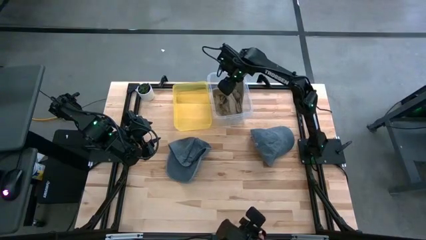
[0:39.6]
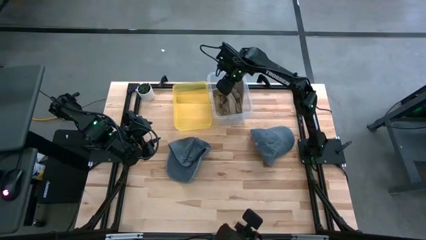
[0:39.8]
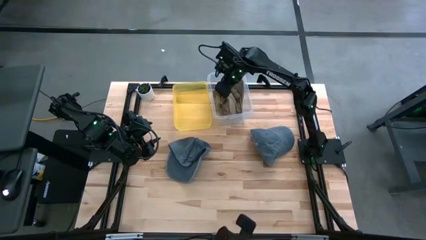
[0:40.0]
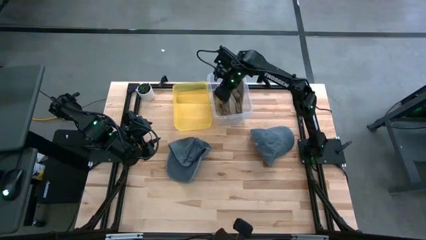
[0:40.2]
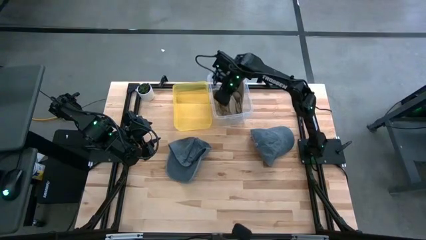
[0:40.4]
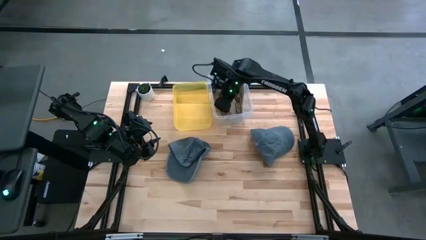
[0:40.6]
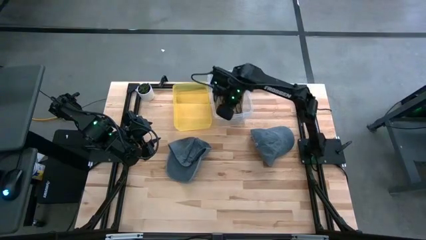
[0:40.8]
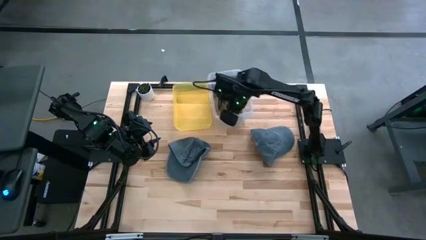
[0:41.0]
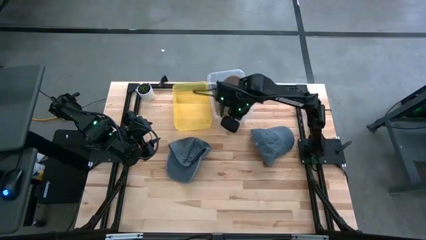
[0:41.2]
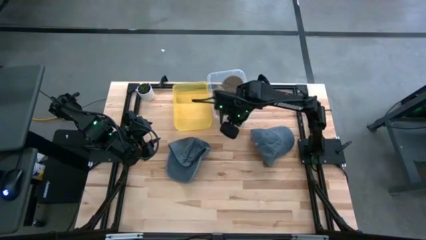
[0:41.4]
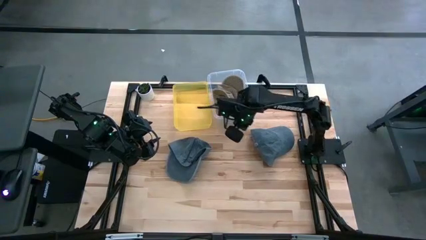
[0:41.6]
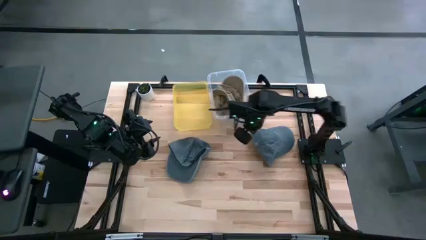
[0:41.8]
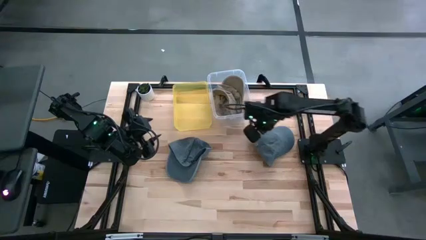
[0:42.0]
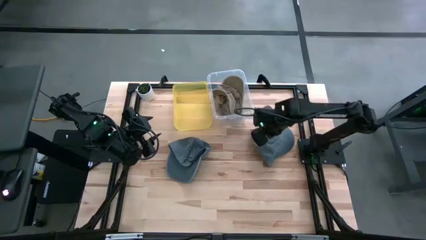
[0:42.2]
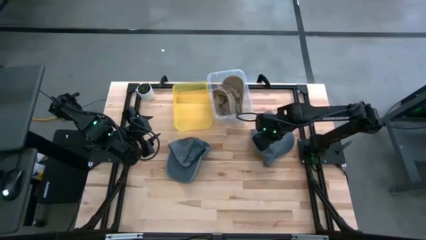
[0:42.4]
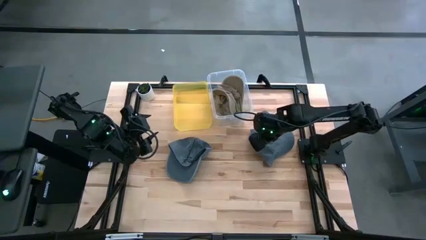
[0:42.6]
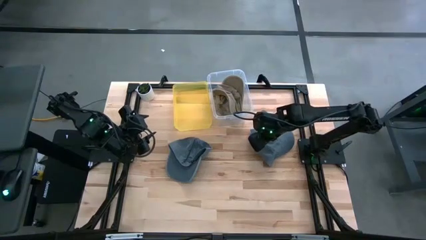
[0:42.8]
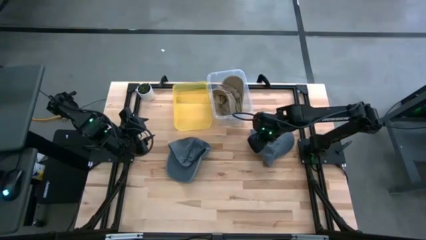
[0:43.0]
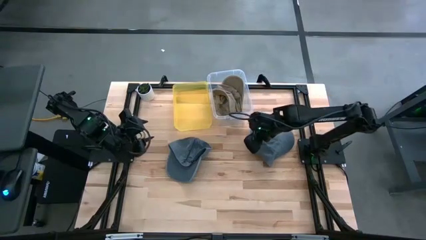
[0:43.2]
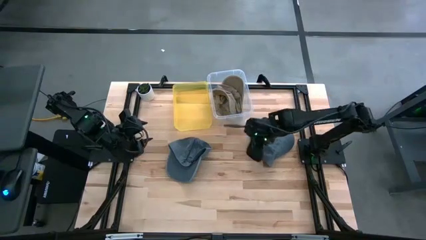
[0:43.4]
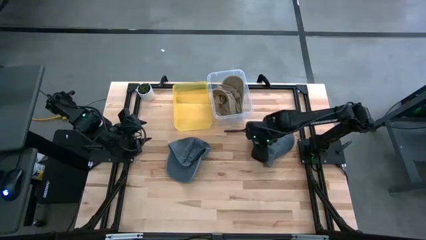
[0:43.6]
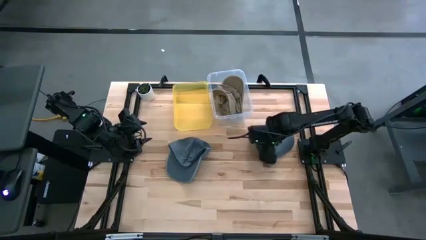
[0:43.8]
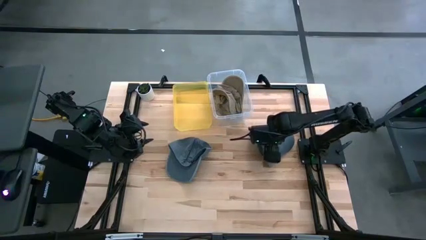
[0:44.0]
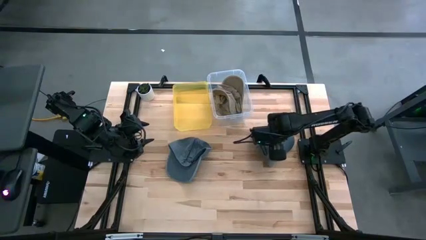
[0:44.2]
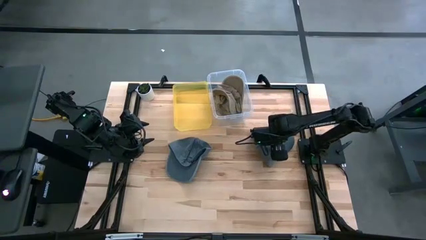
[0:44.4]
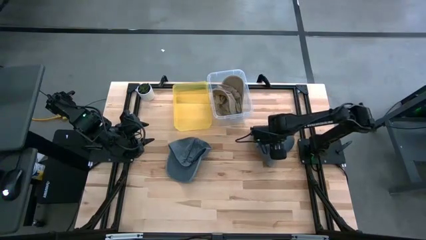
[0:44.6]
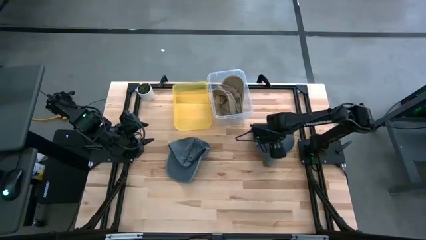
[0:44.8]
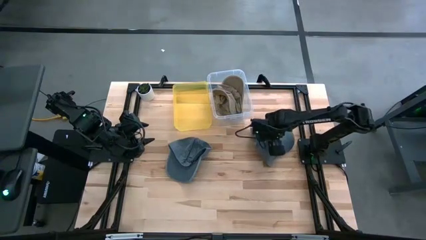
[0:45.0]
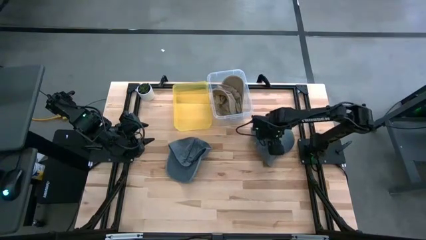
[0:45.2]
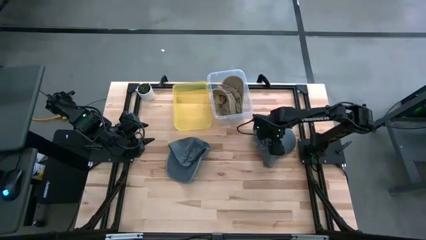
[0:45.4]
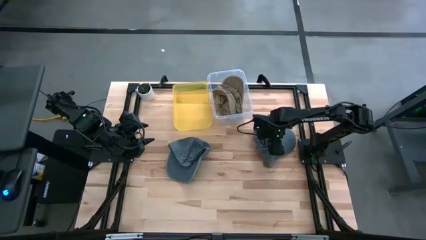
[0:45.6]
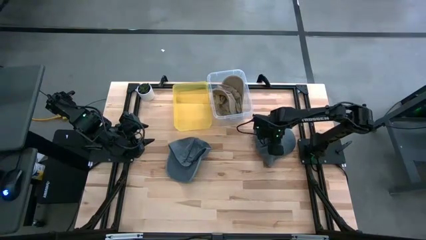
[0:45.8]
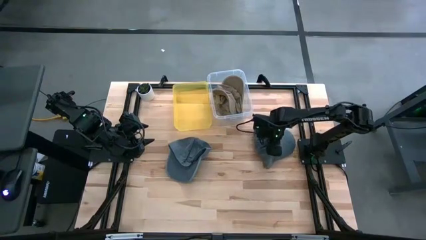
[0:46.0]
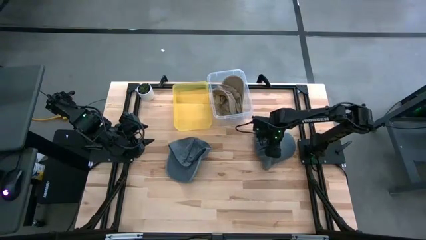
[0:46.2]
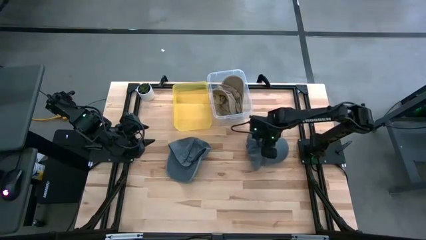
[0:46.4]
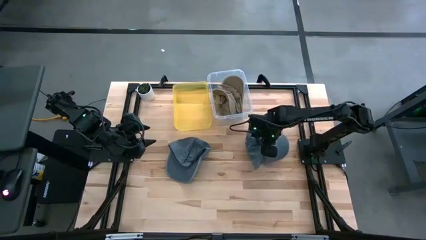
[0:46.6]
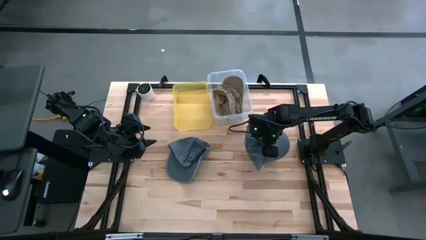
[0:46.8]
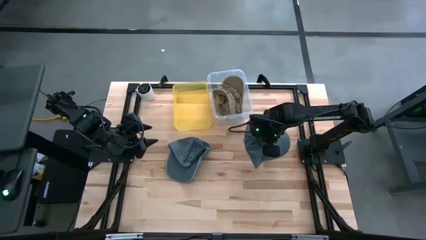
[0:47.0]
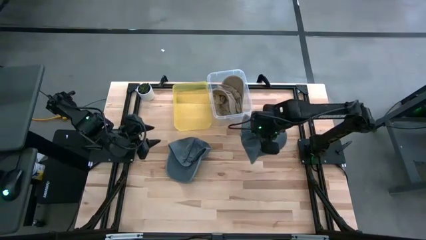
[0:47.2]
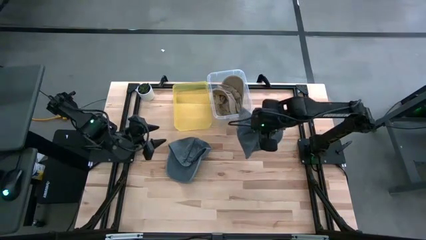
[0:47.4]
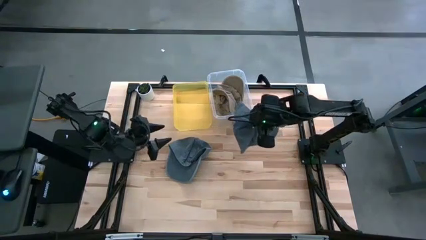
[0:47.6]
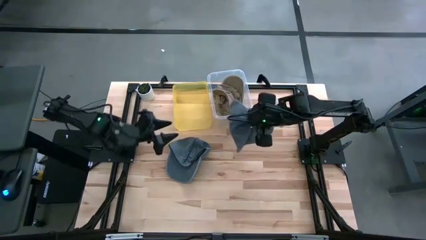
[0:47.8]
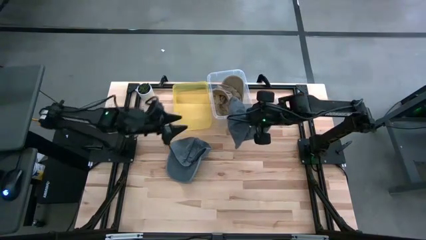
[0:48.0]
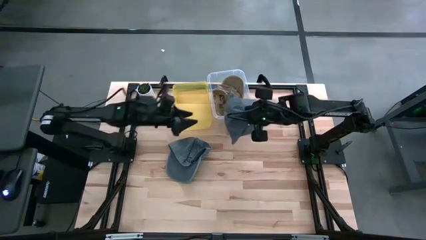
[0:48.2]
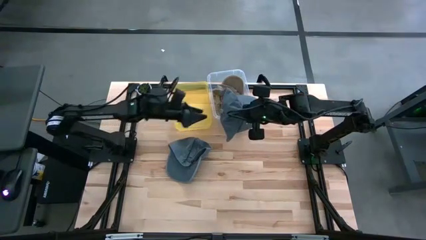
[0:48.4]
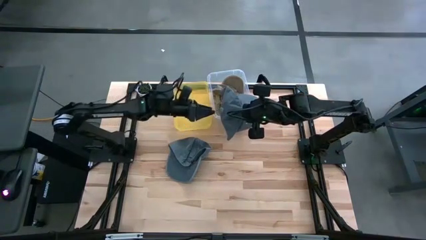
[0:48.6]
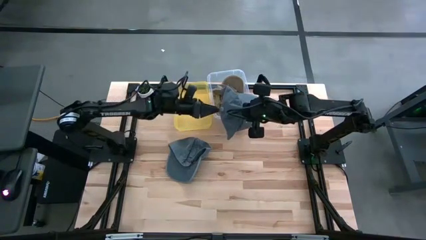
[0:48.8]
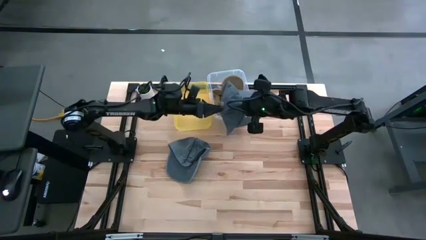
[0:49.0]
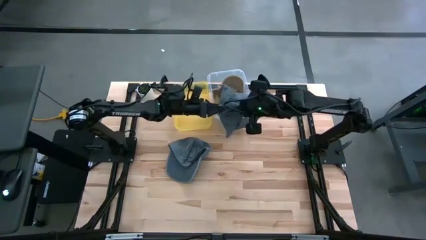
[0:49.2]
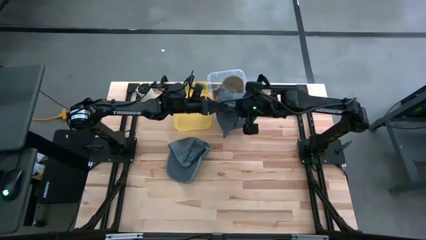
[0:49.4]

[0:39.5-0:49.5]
Task: Pick & Place hat
Put the right blue cap into the yellow bin

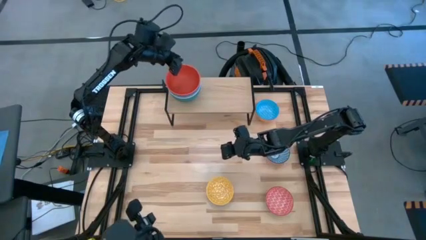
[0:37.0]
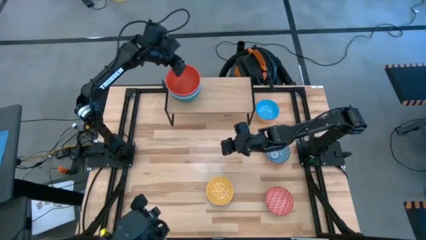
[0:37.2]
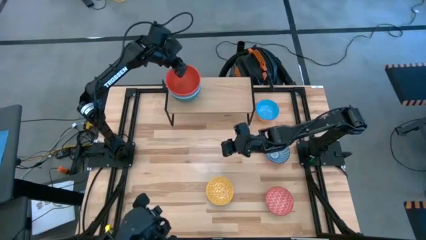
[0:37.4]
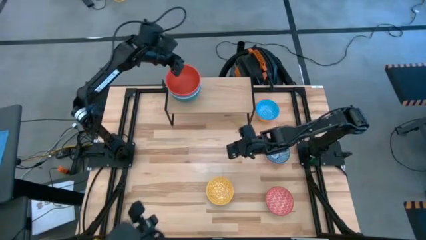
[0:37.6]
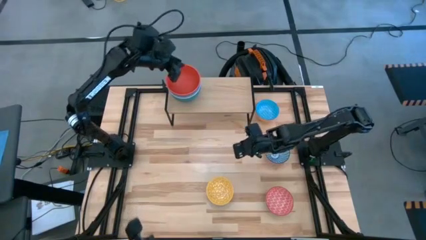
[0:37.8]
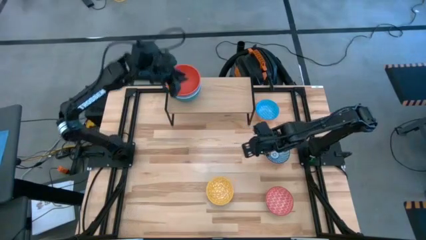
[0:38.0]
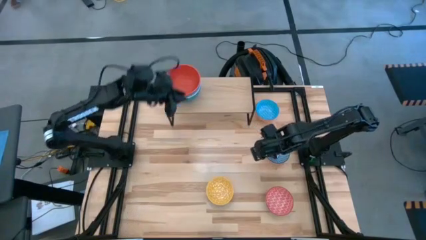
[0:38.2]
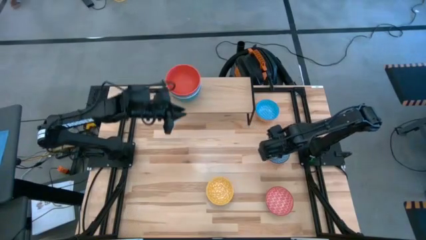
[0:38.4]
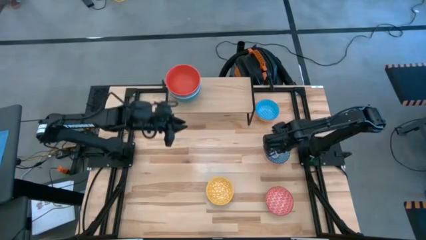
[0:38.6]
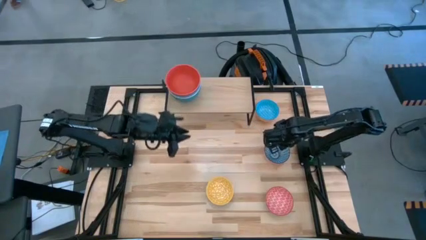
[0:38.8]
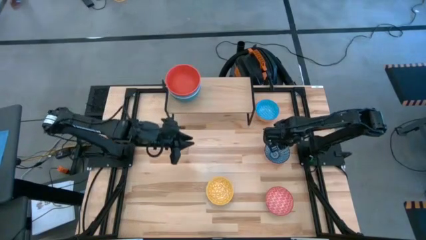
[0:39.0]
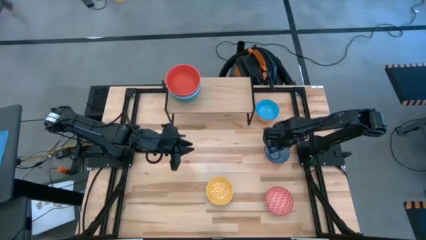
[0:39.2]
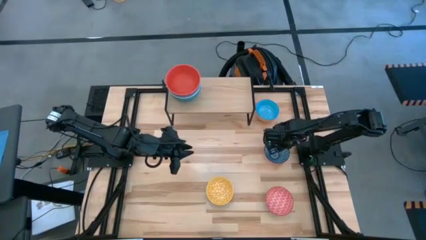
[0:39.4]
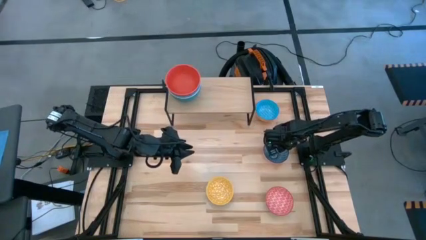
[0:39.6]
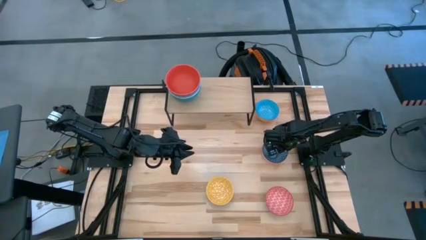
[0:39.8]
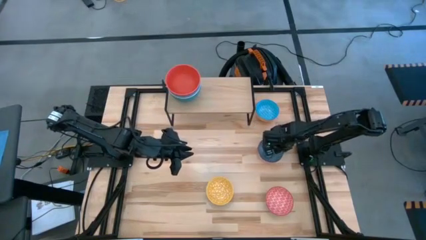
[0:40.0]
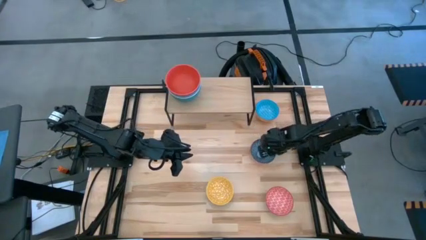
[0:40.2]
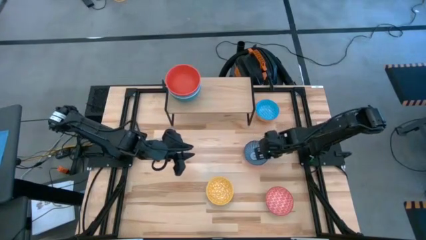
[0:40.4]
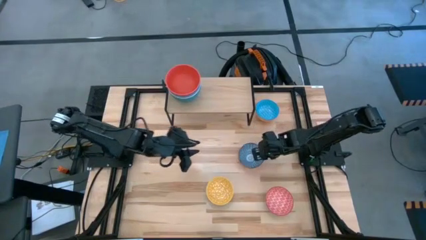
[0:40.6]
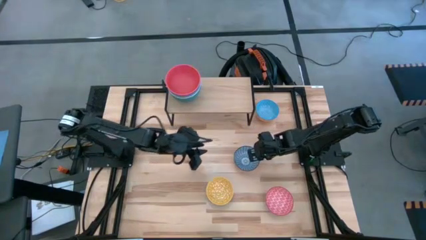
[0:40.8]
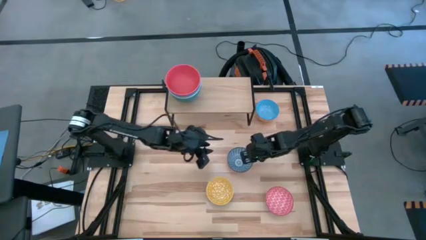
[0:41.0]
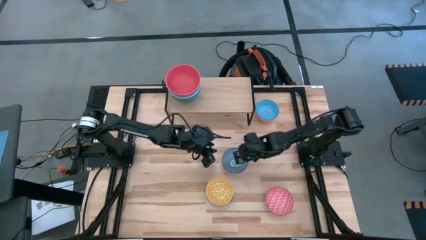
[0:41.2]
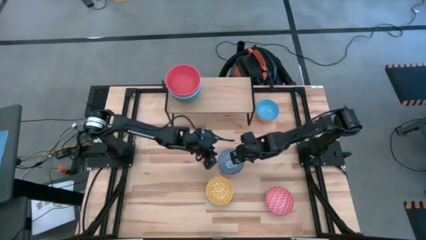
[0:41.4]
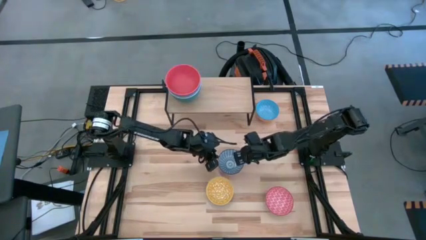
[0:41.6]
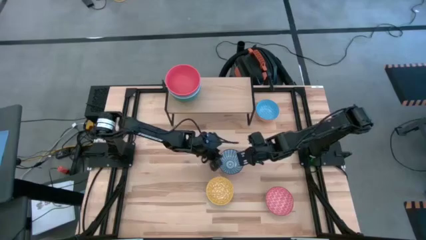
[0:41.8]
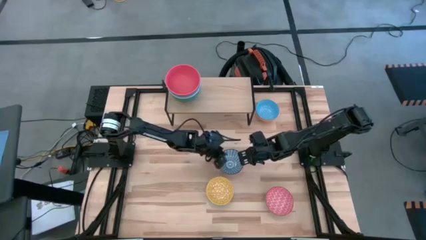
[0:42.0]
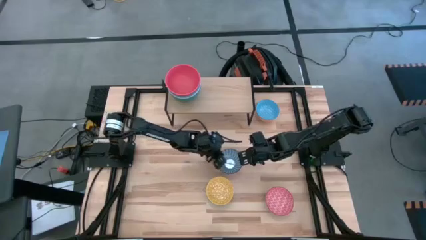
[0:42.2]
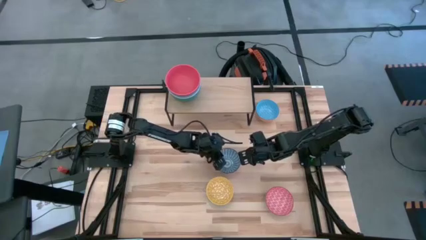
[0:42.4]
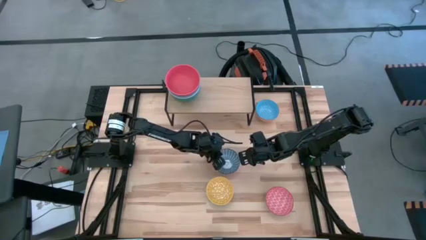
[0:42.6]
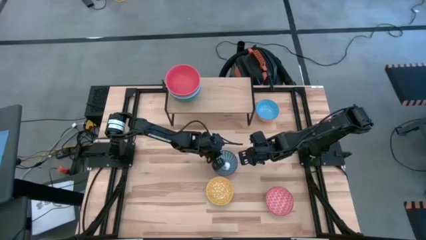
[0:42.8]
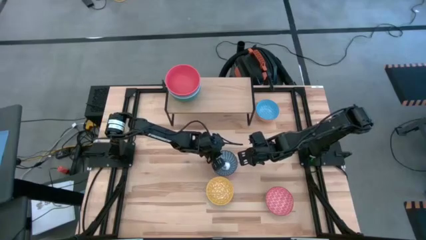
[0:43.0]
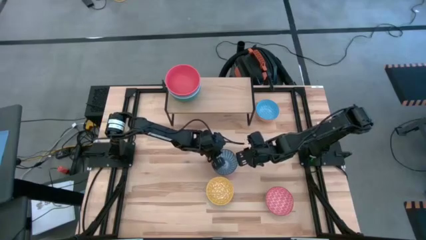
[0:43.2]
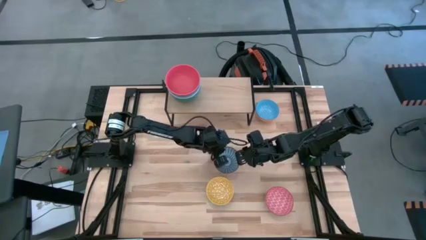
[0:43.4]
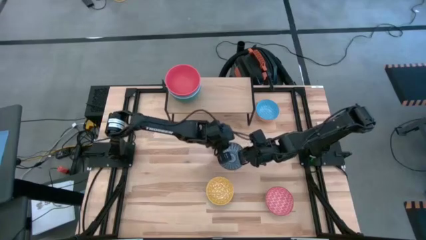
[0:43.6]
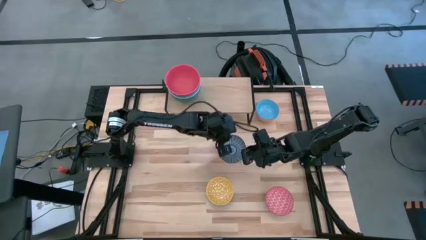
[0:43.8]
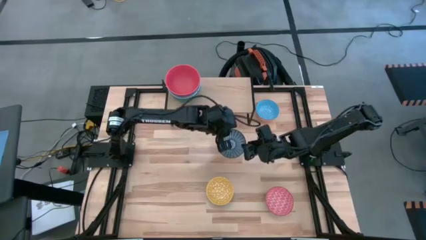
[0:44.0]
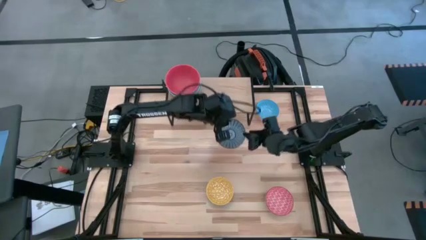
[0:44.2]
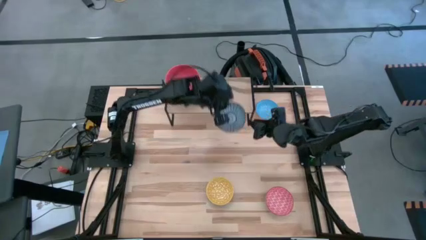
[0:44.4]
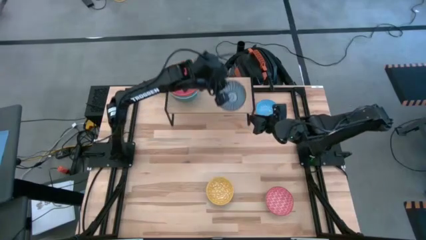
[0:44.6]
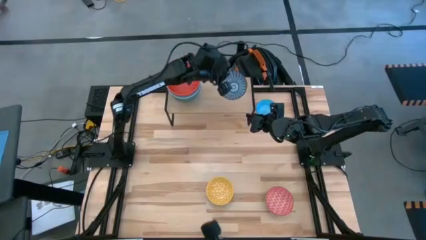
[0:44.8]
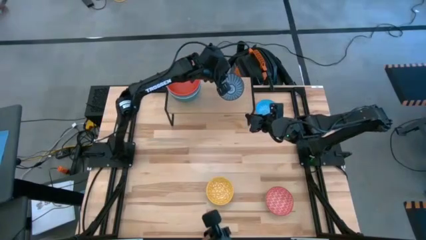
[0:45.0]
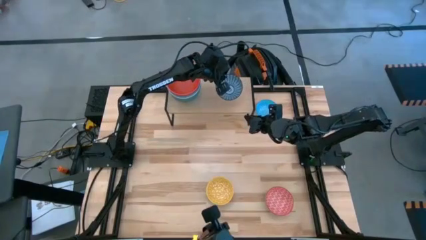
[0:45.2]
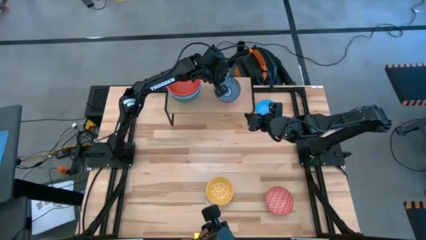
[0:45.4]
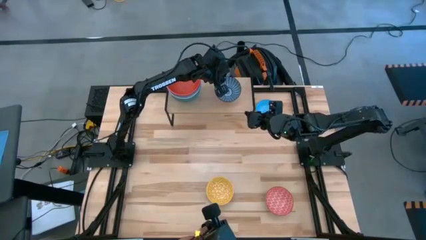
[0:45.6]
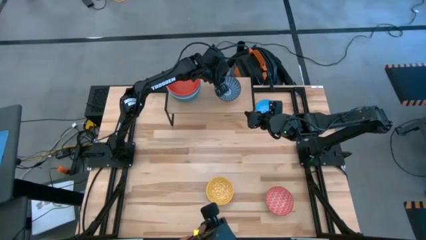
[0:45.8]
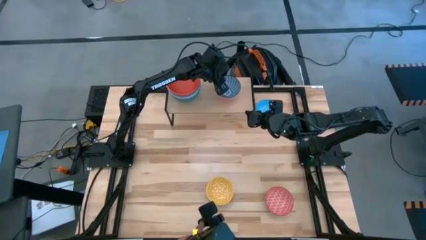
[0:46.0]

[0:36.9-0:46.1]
Task: Place and stack bowls onto a shelf
Put the dark blue printed bowl to the right on the shelf
